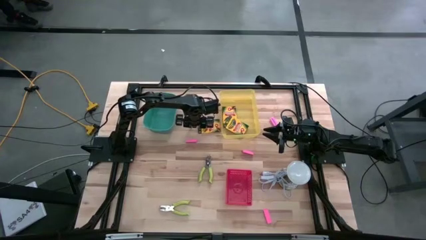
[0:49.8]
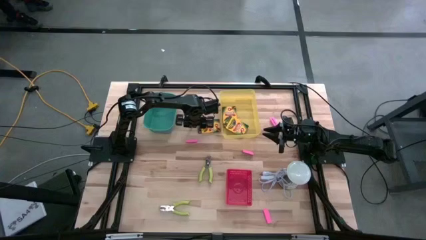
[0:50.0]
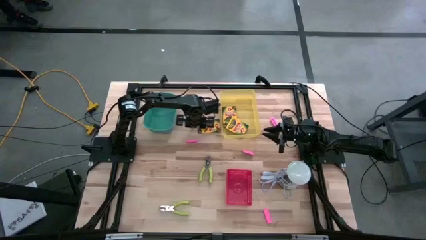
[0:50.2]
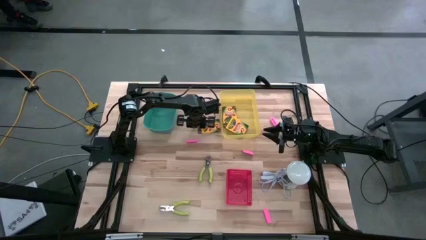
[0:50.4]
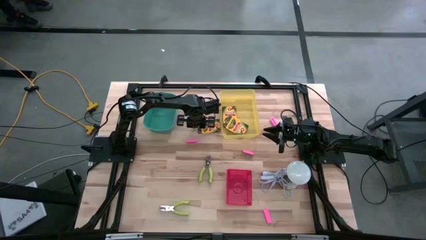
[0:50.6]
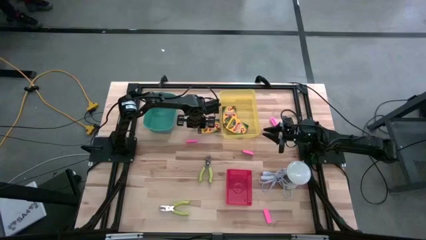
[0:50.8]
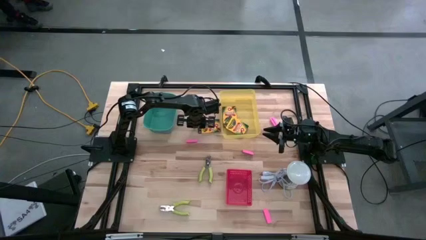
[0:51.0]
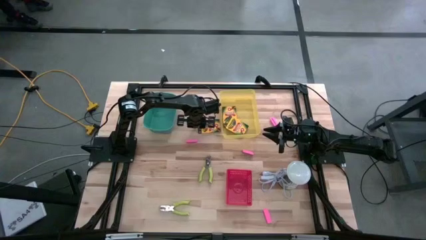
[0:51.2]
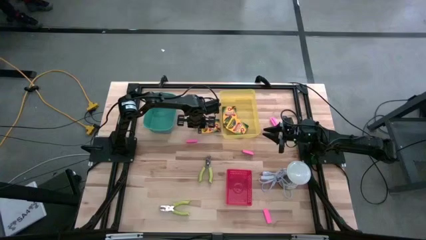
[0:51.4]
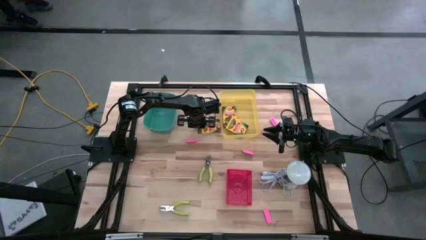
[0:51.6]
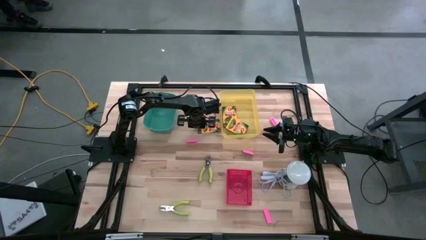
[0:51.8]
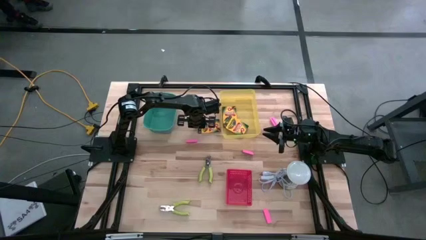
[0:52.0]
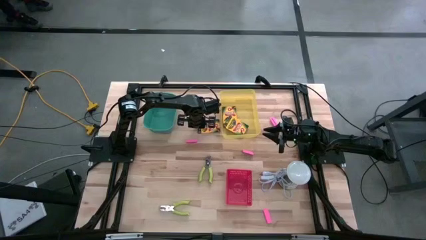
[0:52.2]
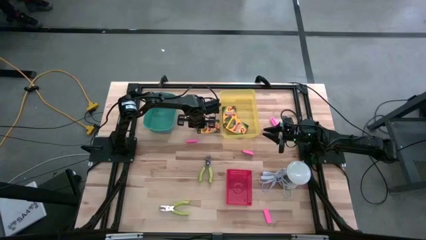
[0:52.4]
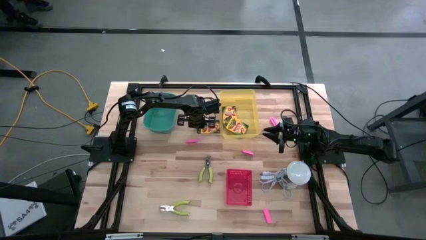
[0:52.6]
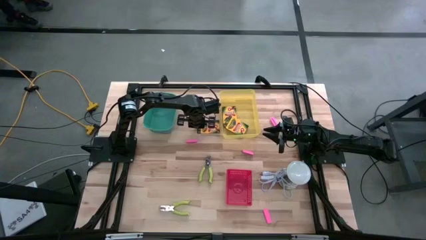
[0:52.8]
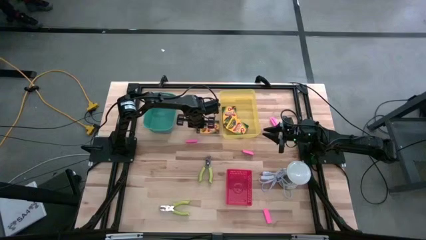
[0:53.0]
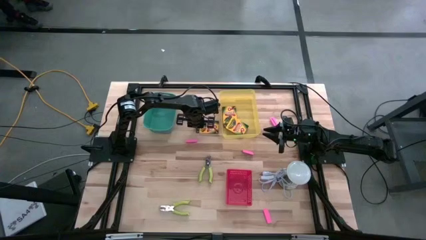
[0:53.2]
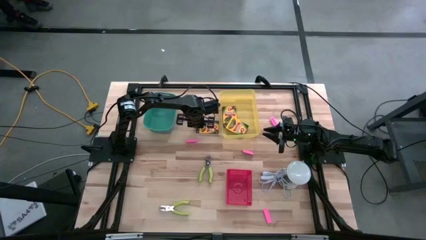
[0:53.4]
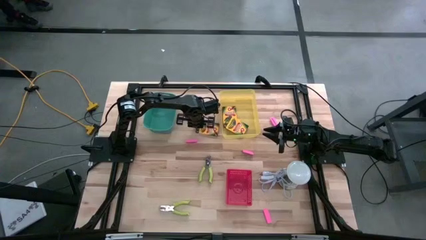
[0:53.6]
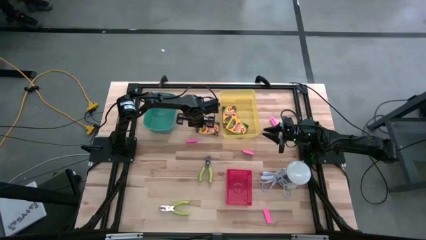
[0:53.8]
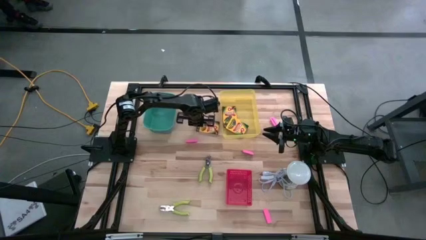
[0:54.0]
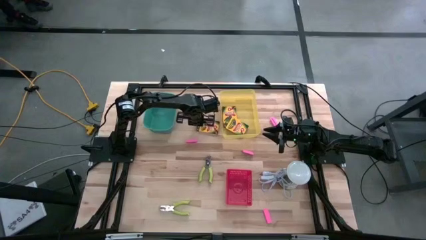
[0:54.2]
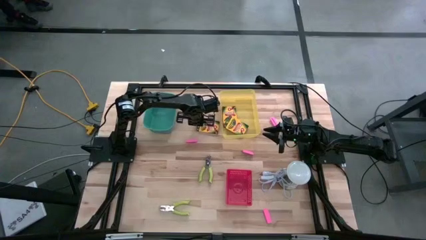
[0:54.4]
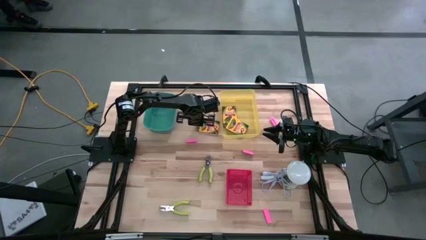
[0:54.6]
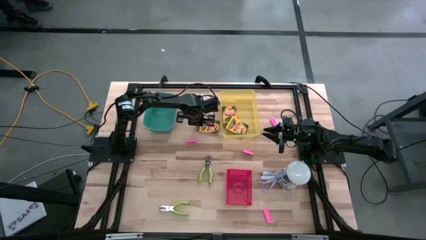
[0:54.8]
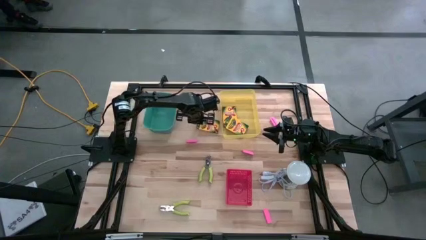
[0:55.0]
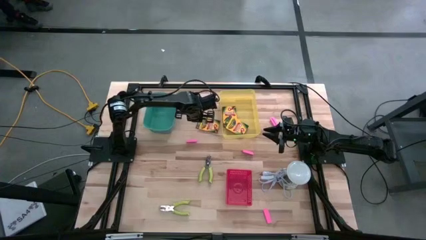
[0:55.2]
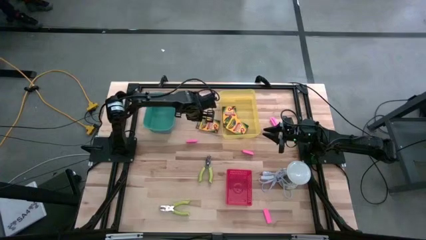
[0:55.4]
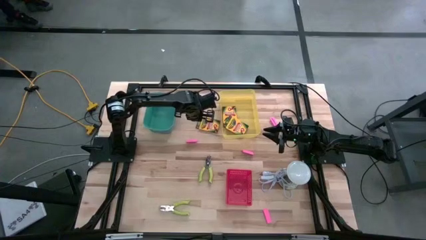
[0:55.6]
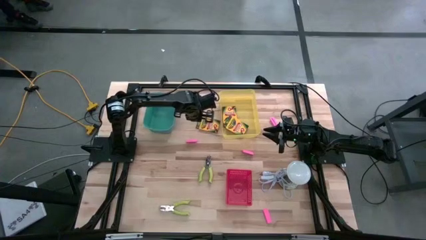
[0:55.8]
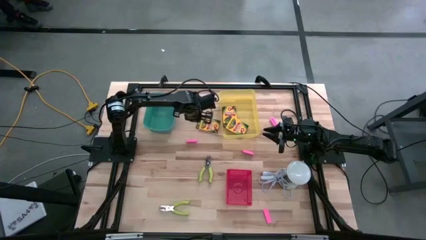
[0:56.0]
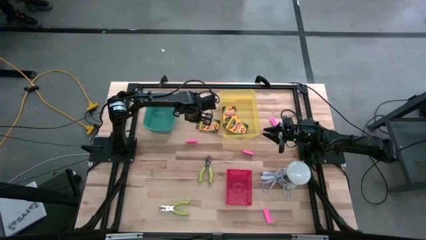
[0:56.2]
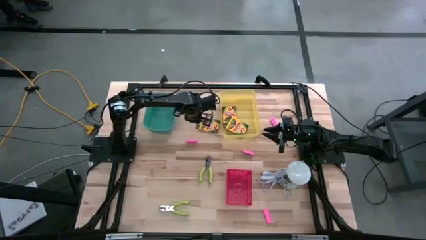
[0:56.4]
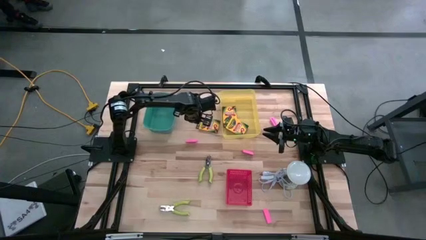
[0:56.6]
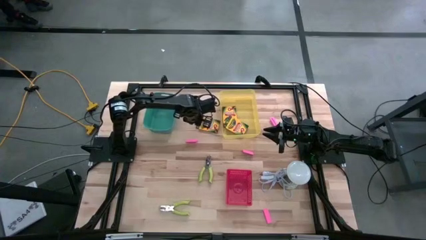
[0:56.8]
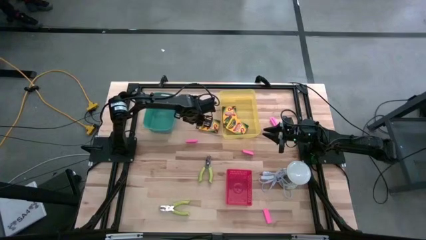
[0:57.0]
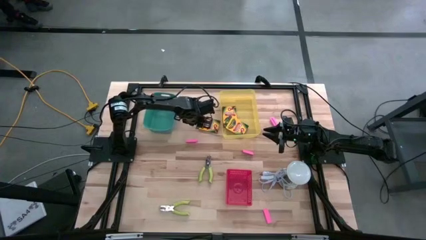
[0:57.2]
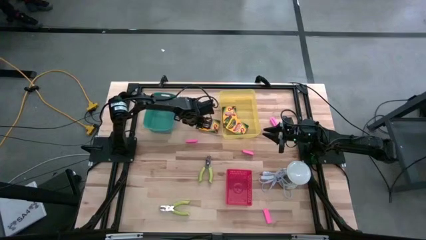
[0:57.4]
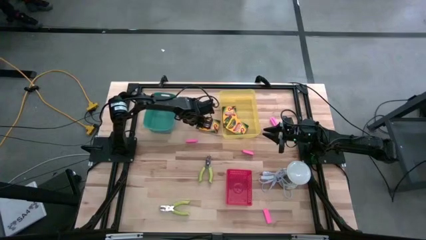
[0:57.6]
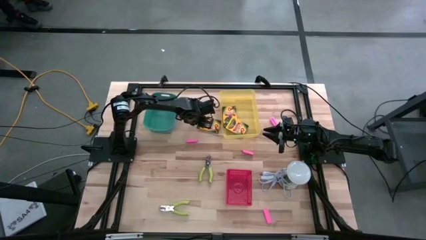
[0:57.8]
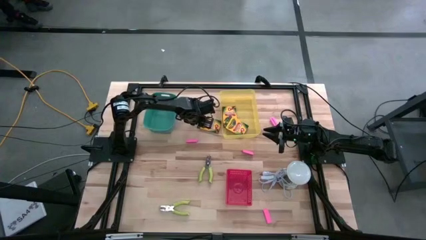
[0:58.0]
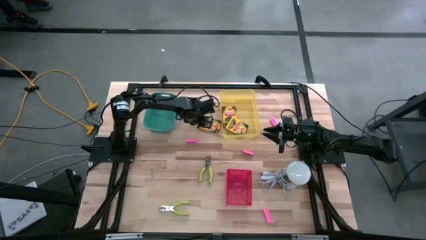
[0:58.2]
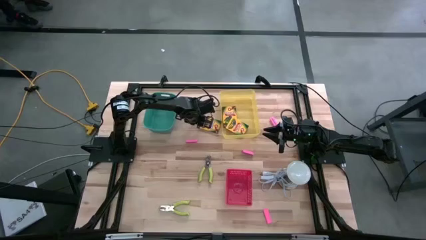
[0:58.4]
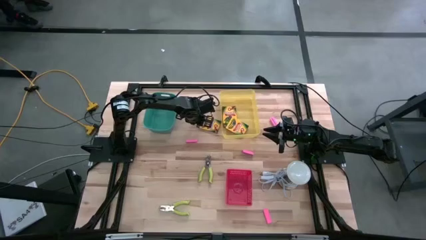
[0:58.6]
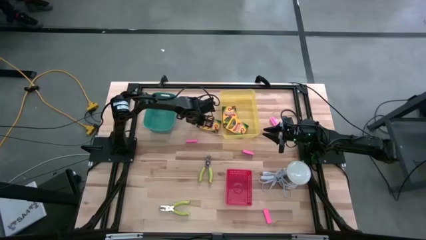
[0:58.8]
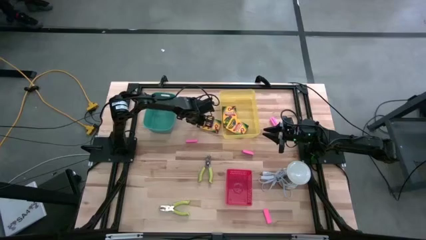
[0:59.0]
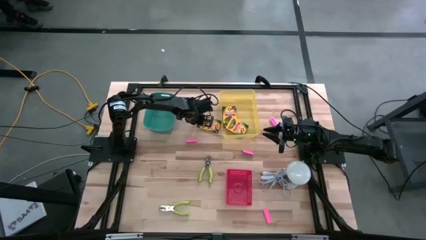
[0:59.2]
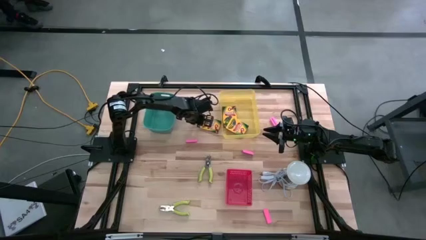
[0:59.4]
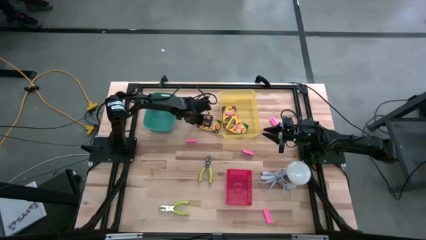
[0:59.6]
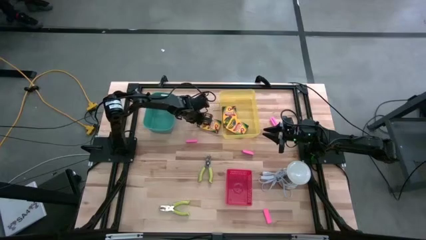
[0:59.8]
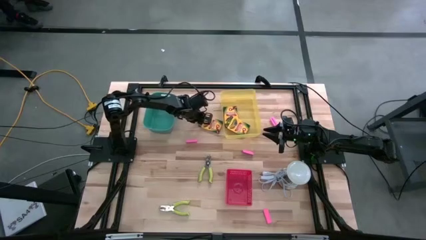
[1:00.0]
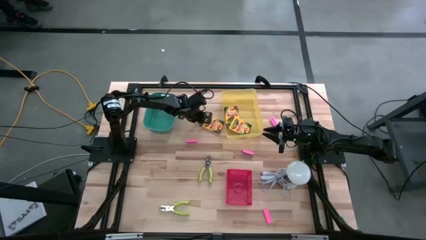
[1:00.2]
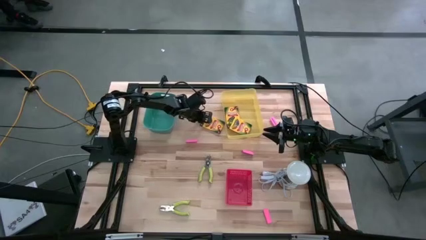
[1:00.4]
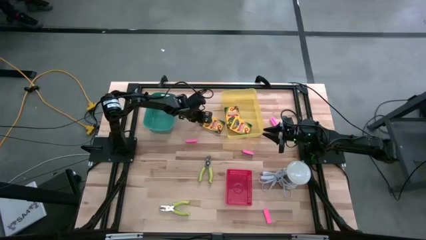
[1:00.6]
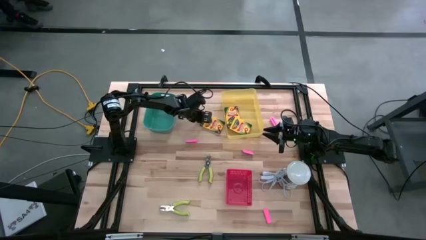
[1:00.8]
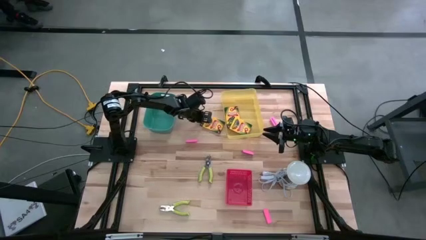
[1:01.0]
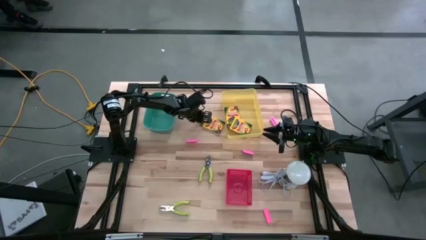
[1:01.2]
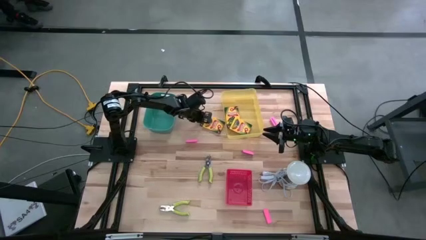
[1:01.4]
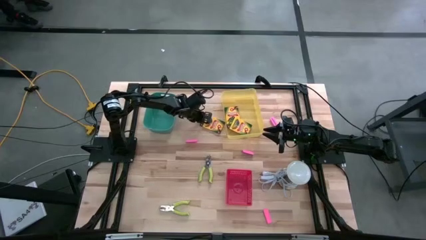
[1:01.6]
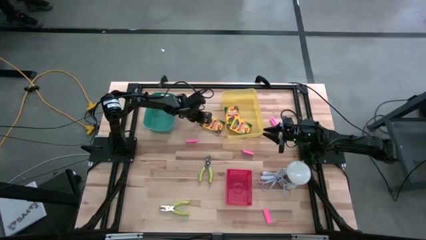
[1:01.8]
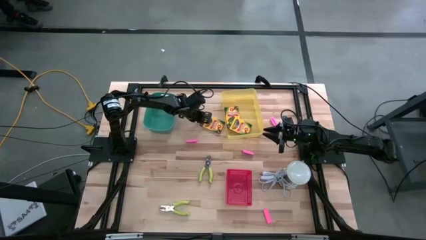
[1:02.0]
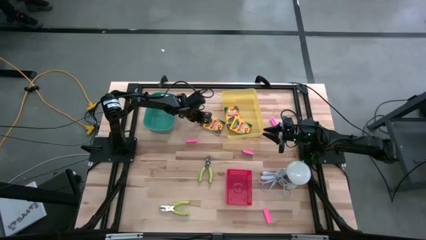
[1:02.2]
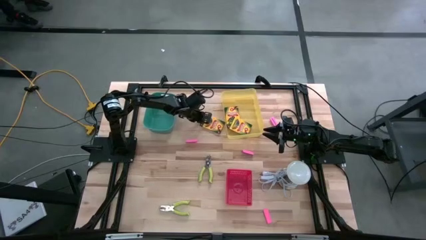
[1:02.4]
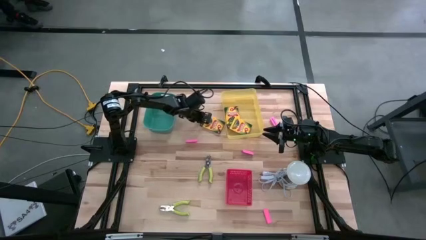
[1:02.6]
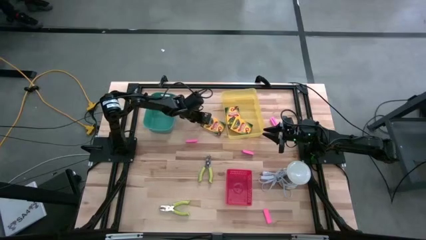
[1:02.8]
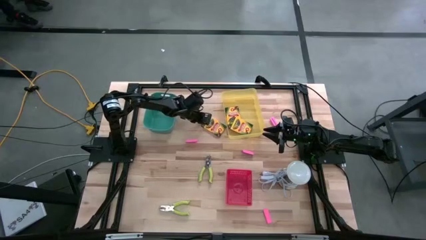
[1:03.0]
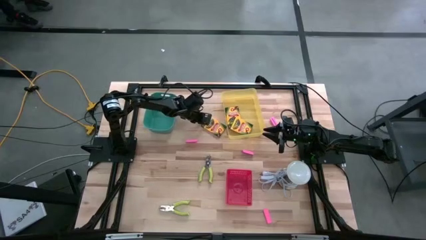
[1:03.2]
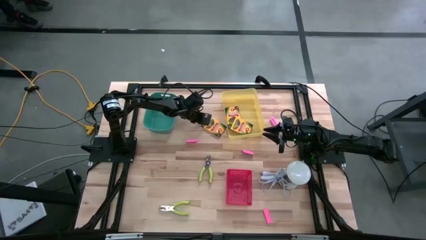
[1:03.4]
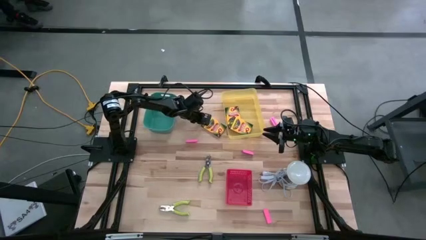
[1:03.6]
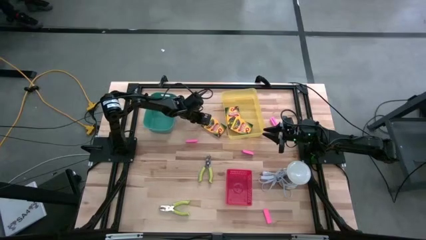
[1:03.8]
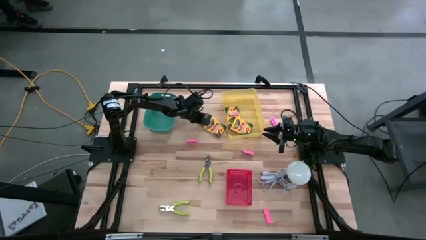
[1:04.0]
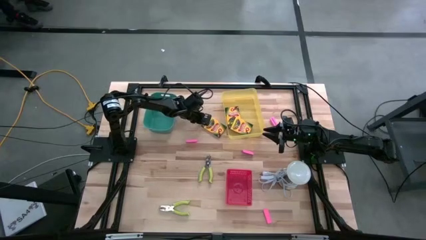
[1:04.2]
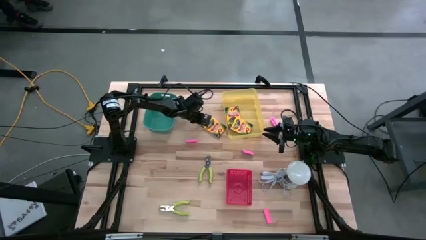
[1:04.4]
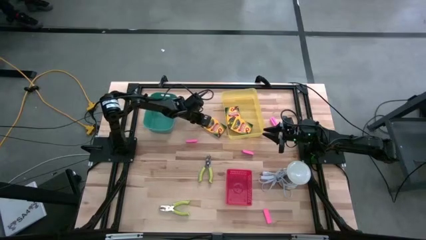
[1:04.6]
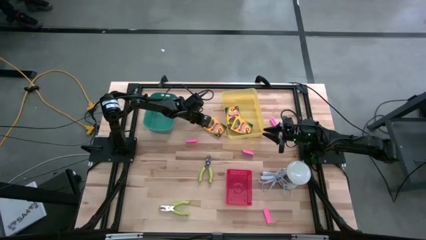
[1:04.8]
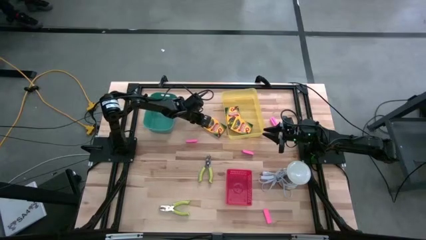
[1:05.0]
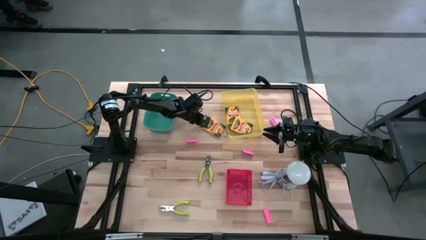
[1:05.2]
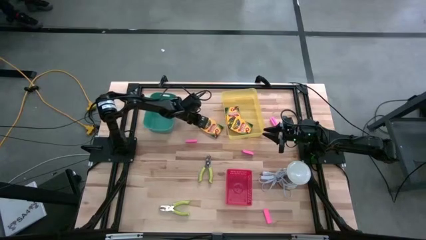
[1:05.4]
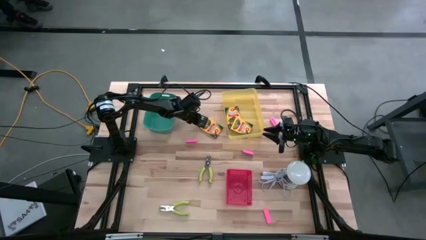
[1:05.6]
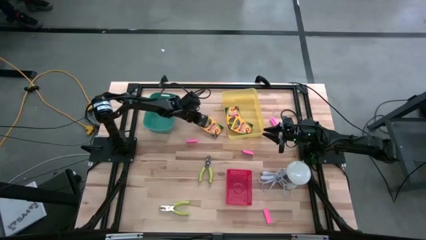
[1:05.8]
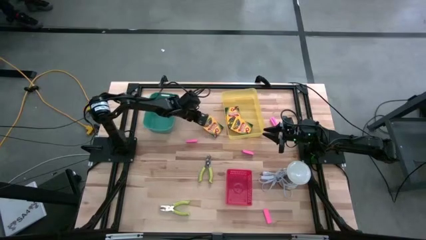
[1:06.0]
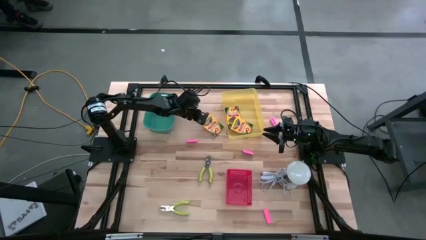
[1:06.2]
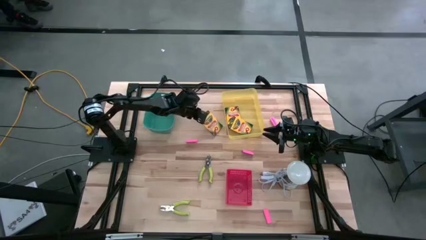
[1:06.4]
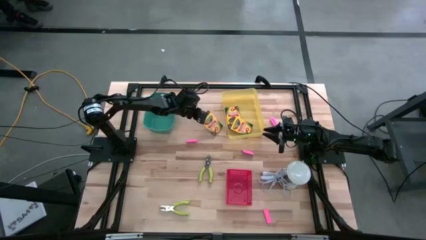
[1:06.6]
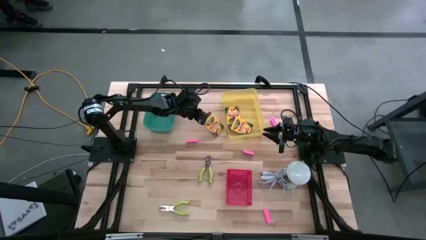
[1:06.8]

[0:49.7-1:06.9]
Task: Pick & Place School Supplies
Put the crayon box into the yellow bin
